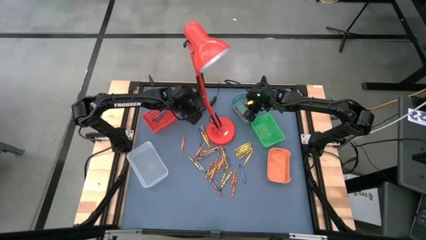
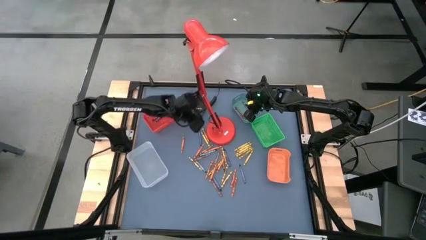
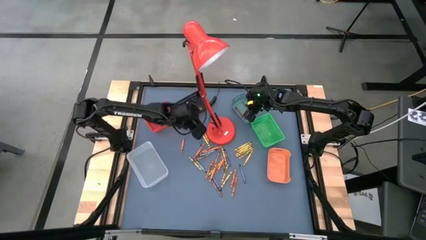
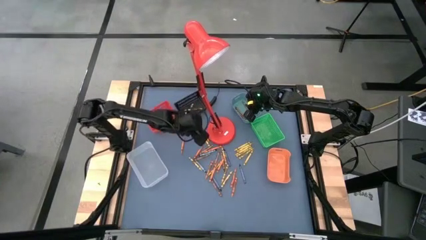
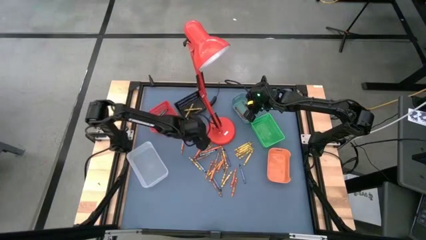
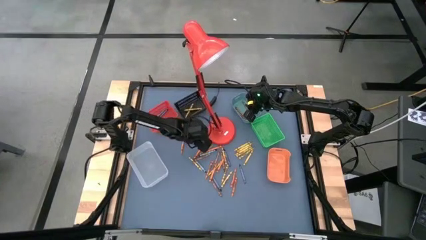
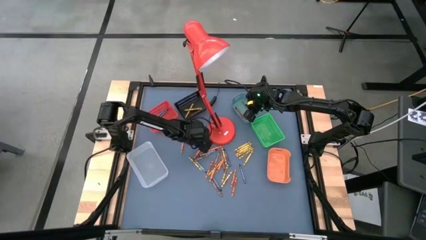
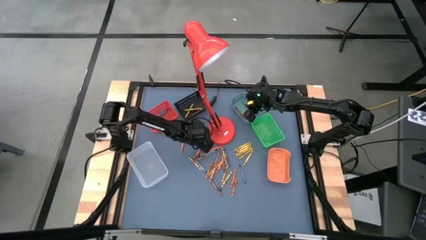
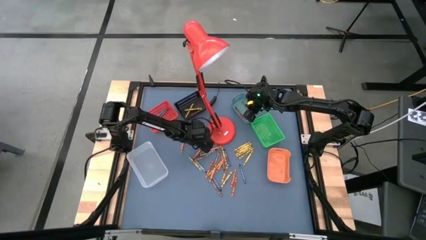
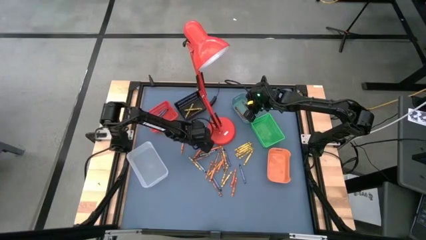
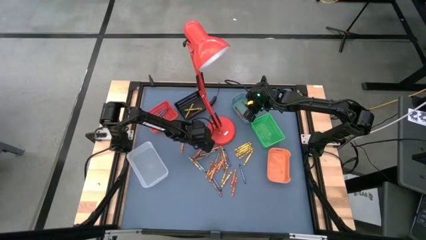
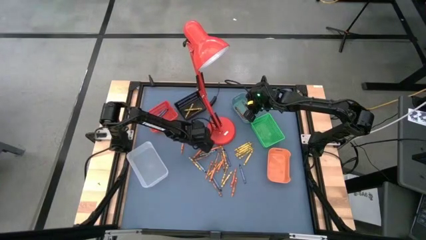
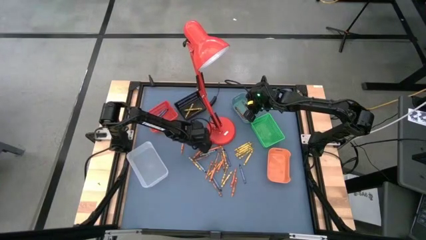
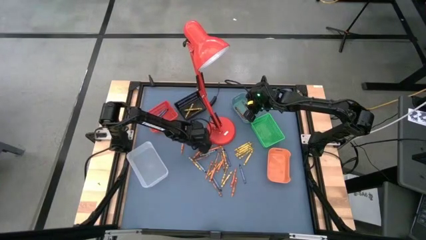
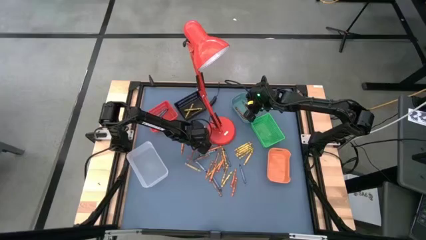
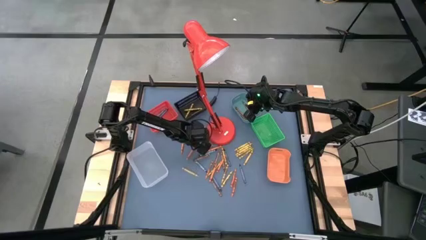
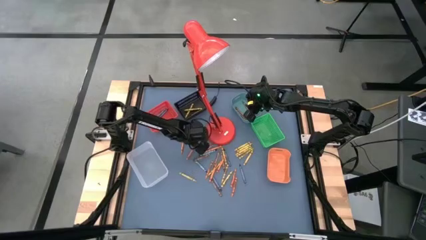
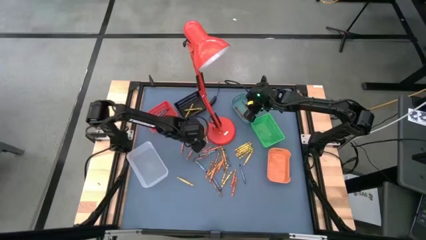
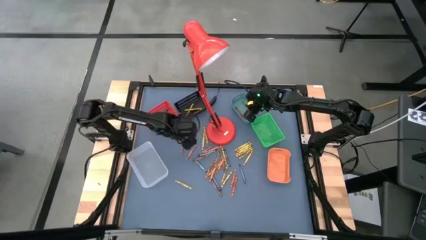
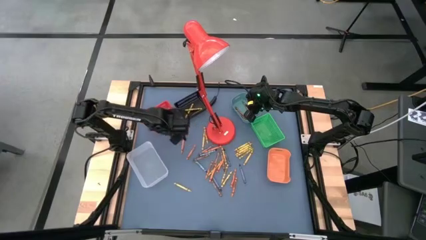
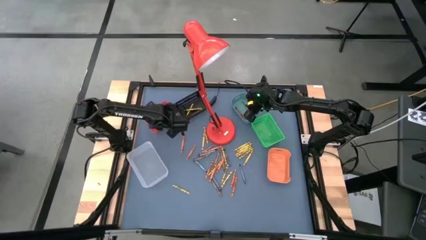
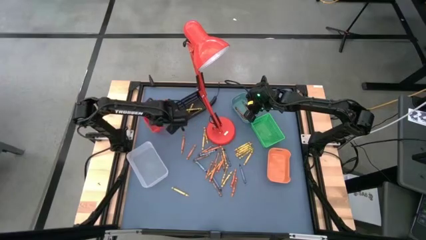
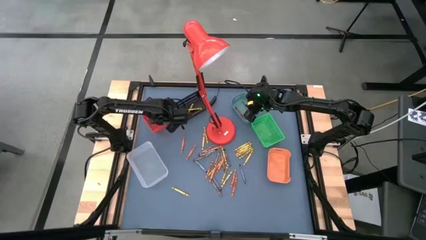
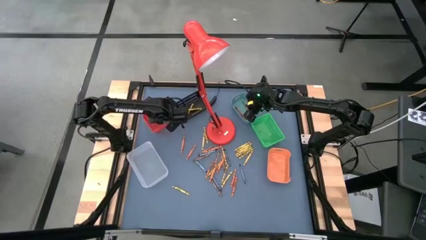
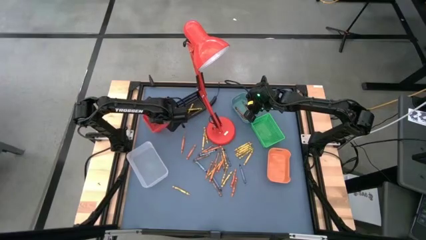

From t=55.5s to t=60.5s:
Task: Sort crayons
Put the blue crayon into the middle left red bin

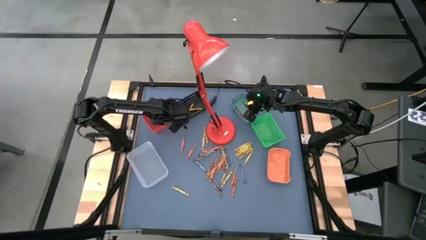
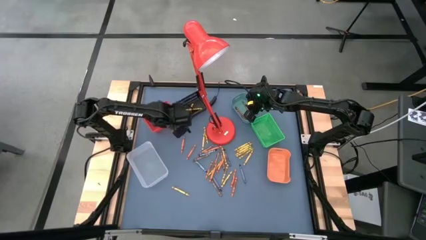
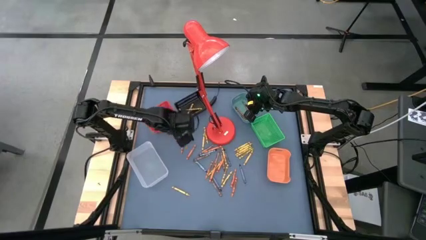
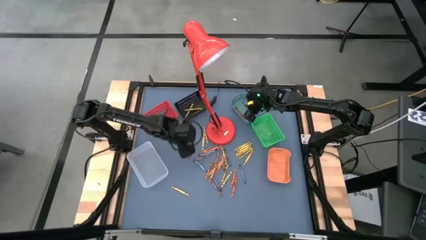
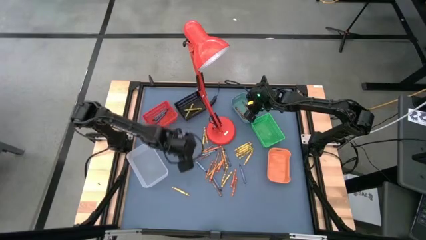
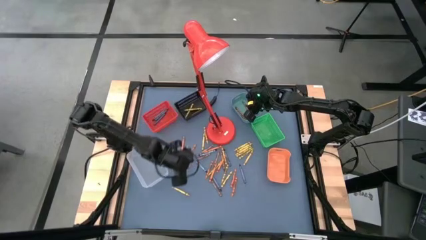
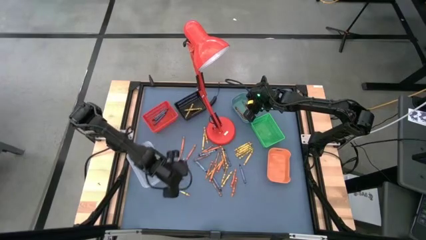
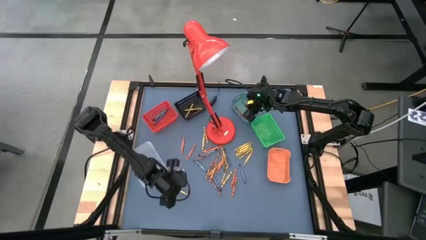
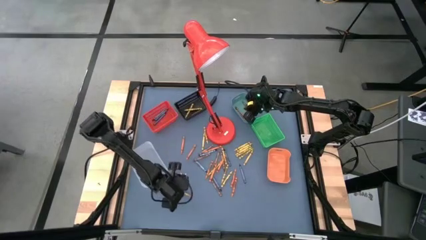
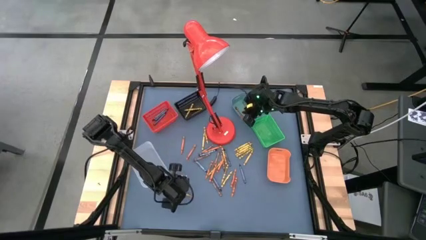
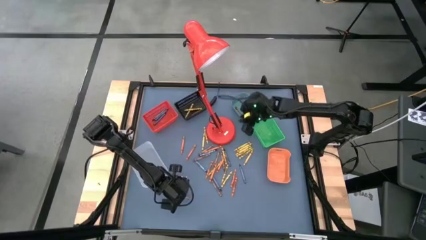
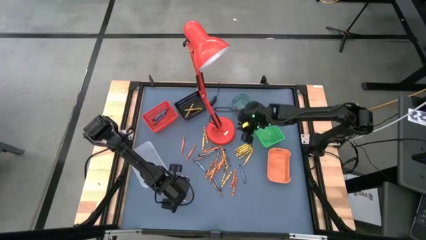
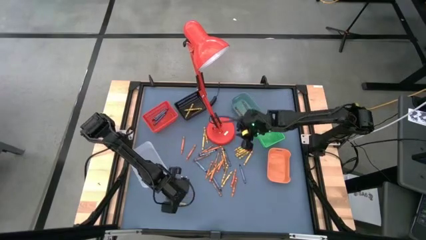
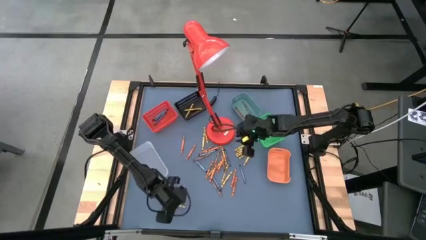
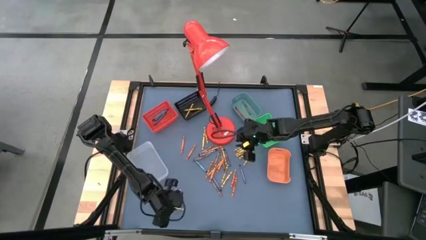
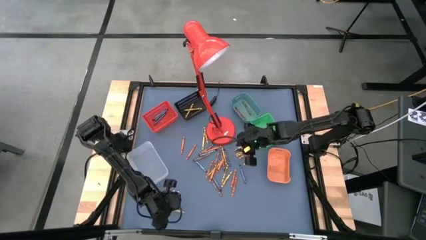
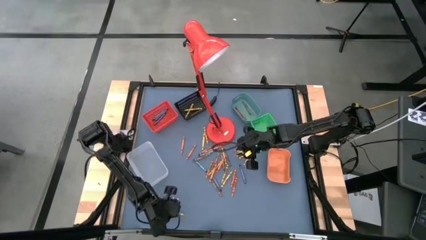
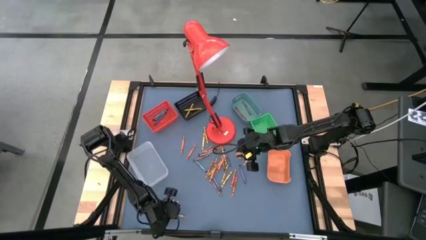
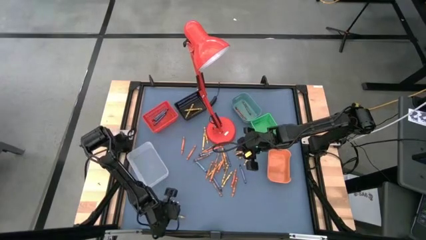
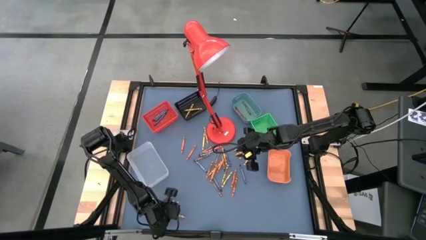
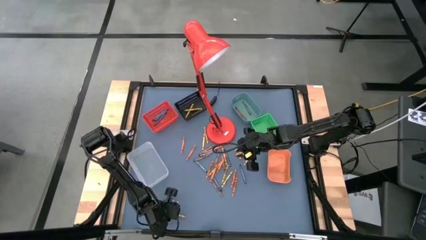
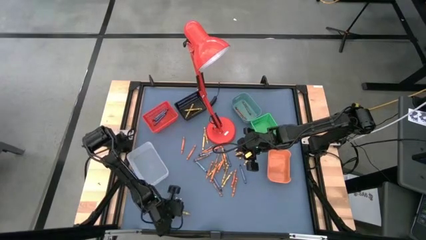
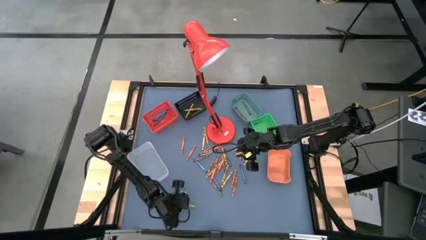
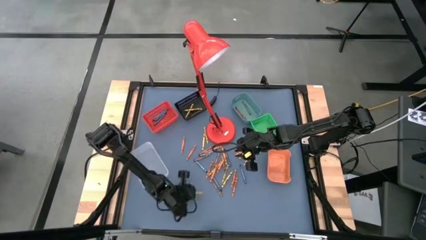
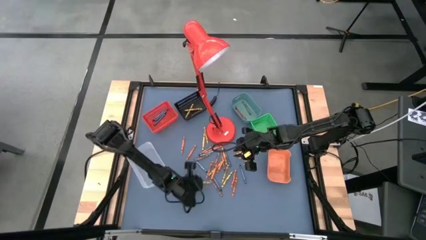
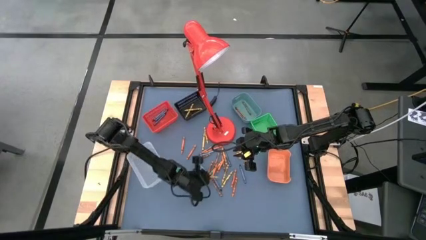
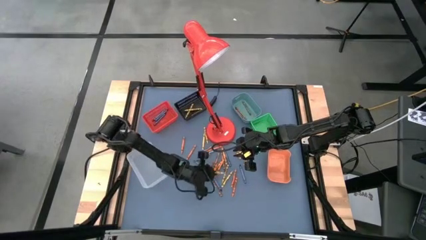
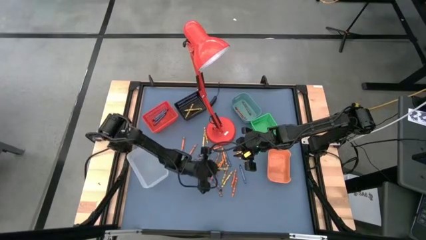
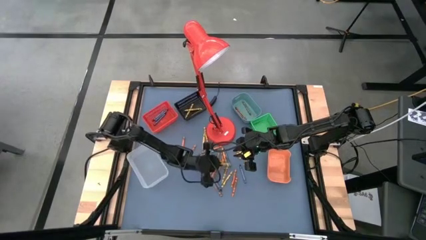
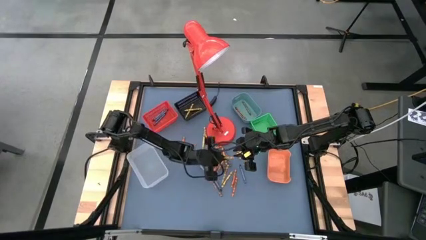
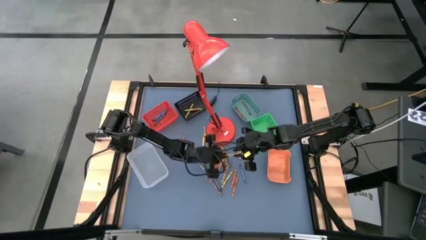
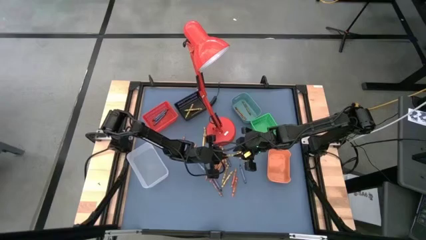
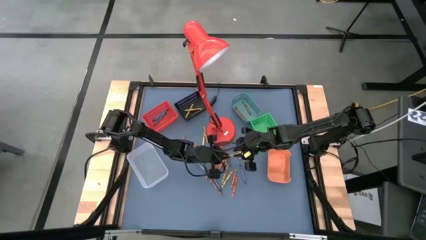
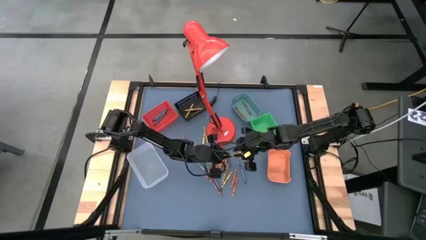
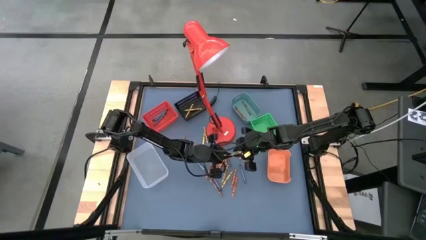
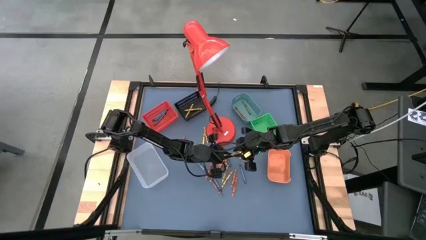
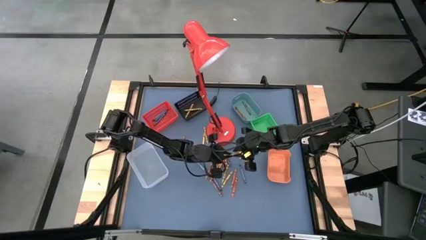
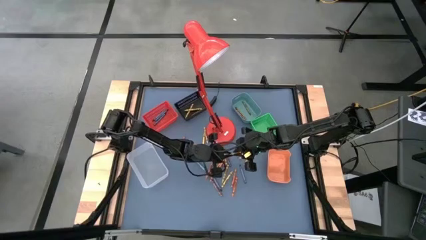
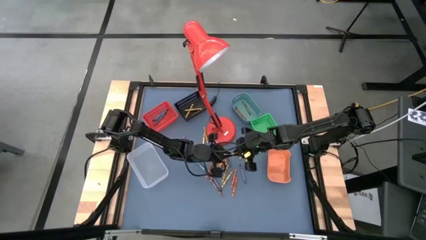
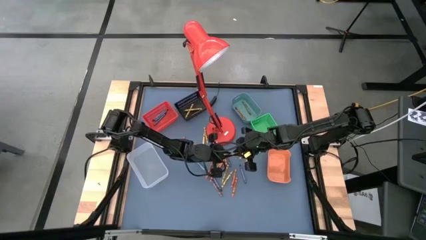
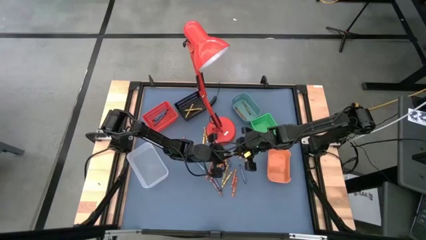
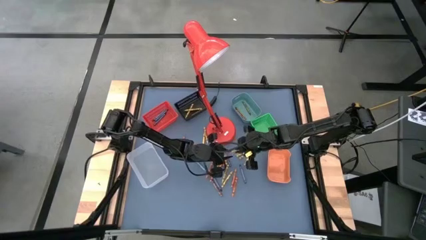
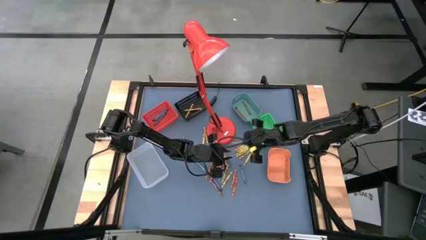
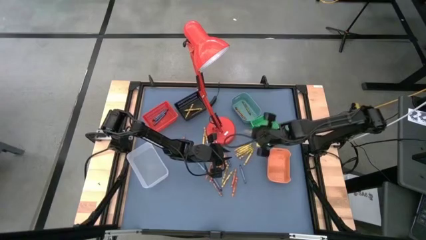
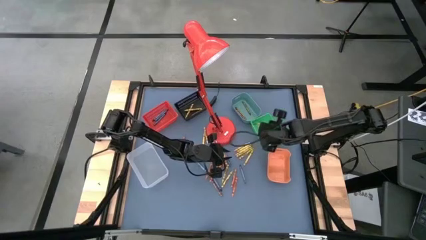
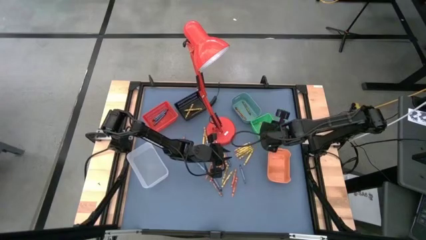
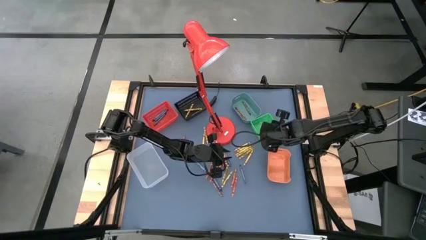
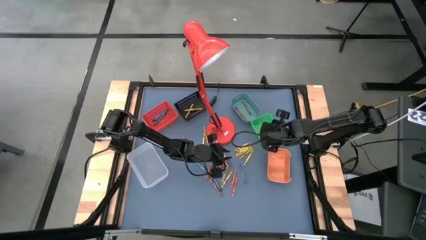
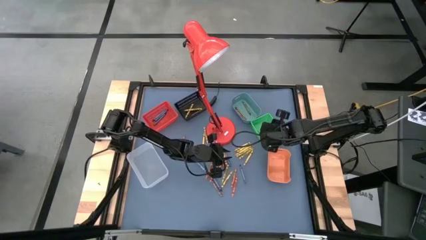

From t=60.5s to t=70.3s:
Put the yellow crayon into the middle right green bin

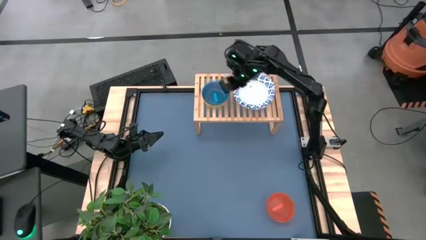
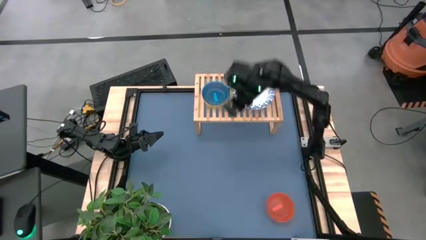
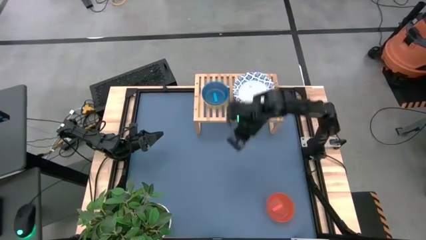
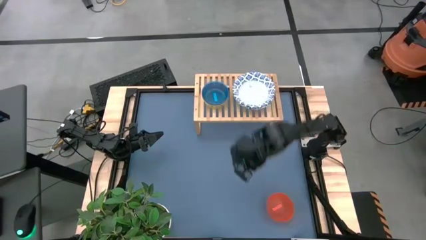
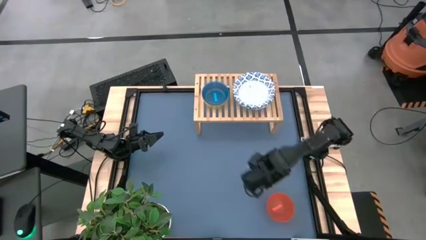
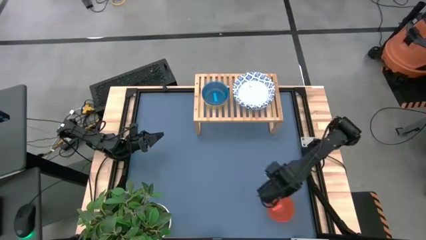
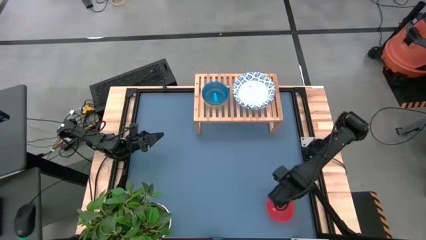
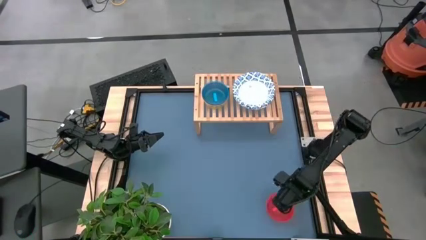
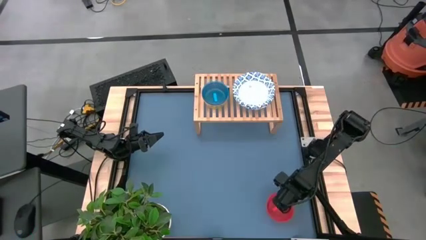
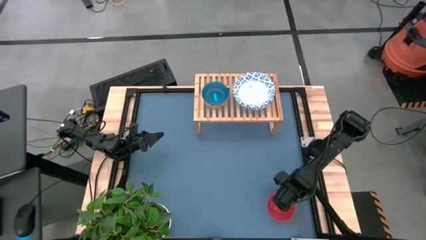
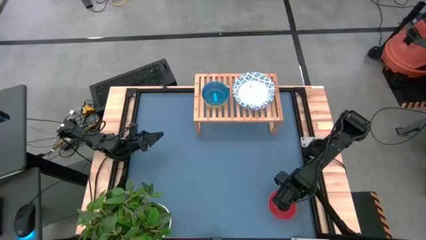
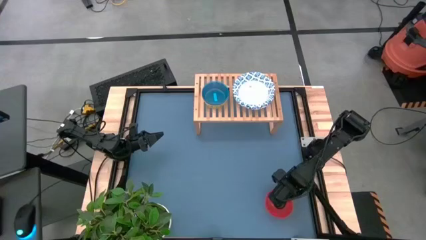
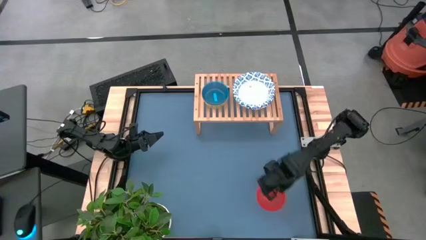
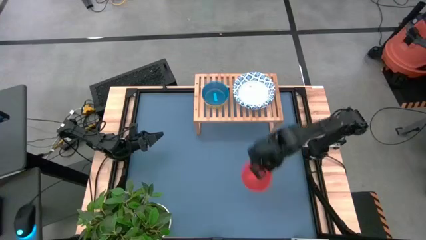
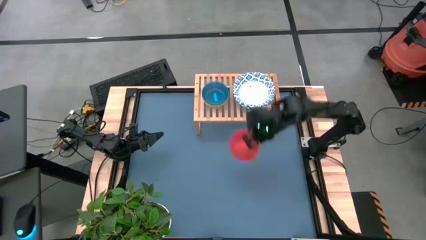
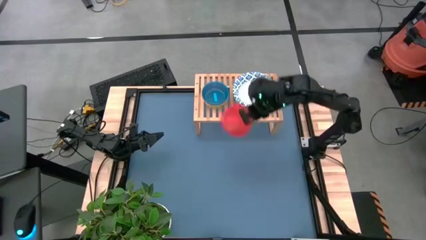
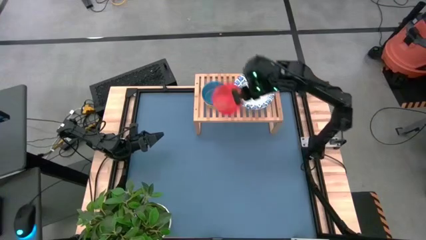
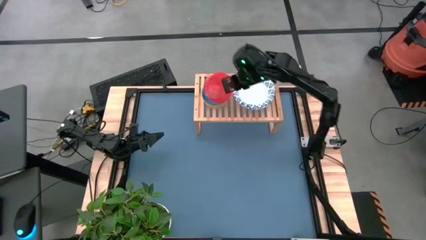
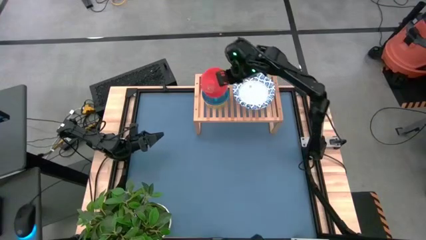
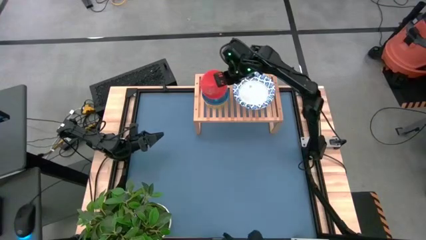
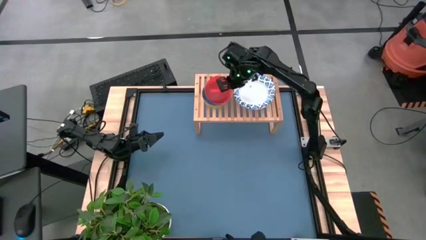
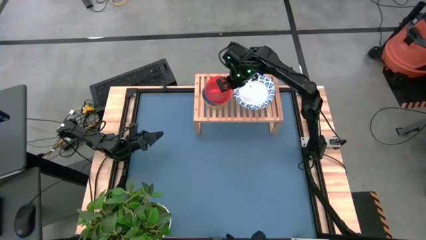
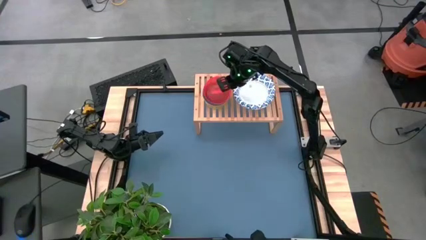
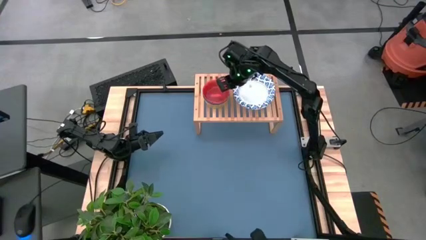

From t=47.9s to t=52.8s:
Task: Place and stack bowls onto a shelf
Stack the orange bowl on top of the blue bowl on the shelf
